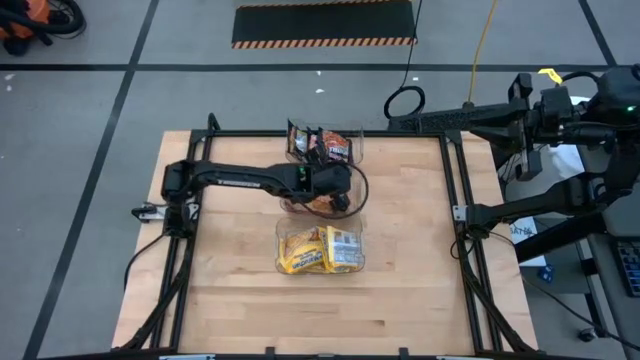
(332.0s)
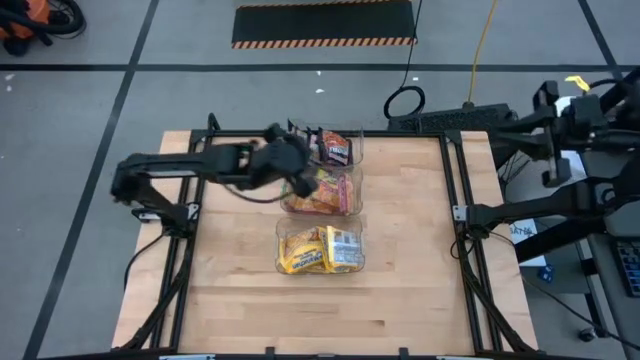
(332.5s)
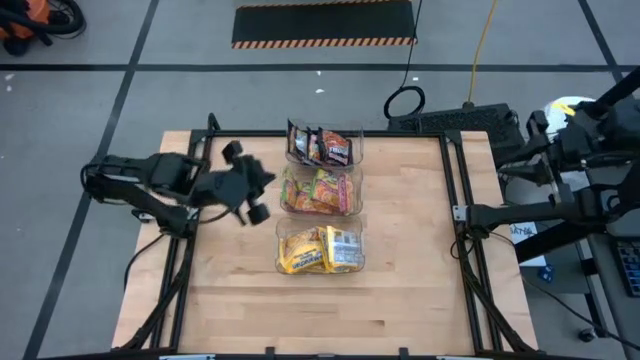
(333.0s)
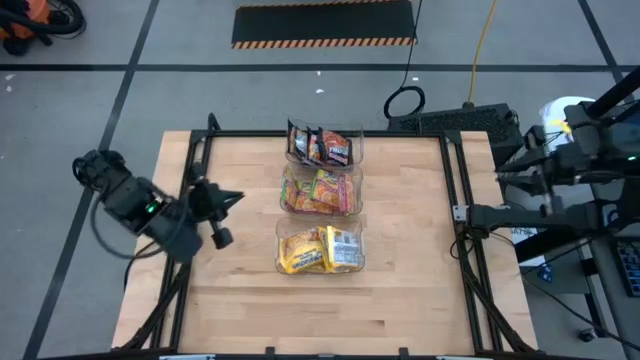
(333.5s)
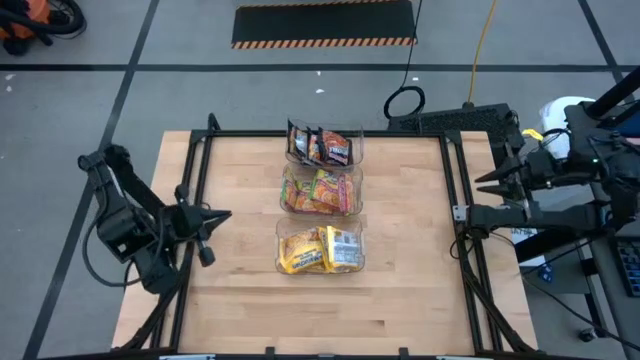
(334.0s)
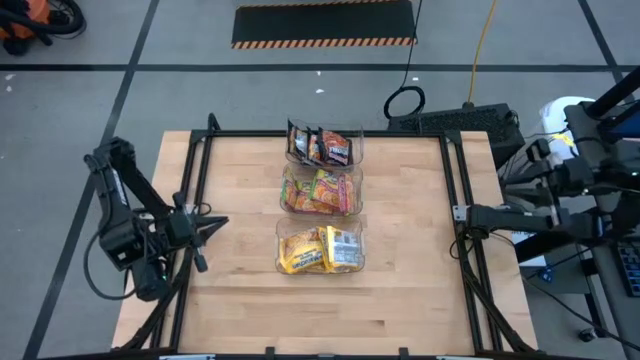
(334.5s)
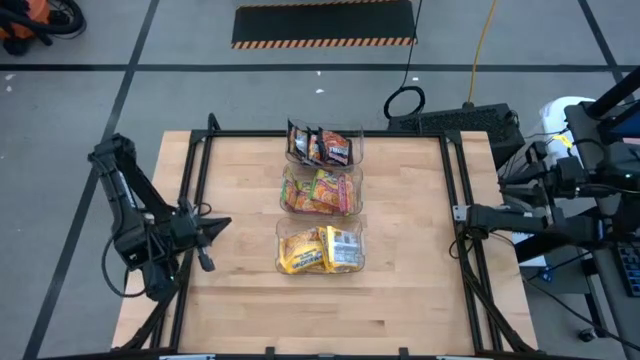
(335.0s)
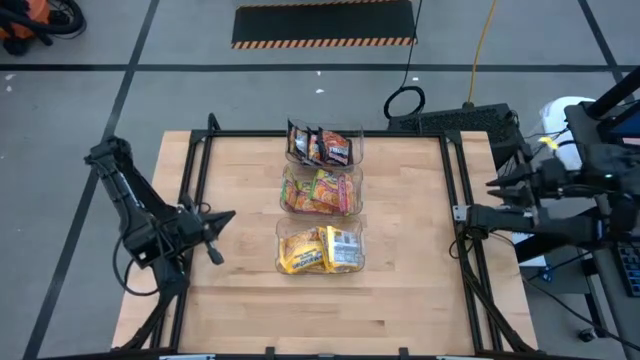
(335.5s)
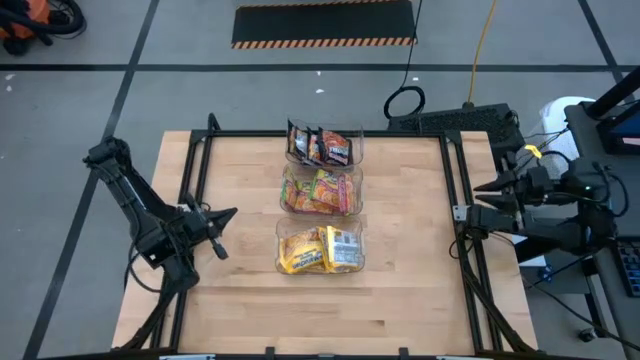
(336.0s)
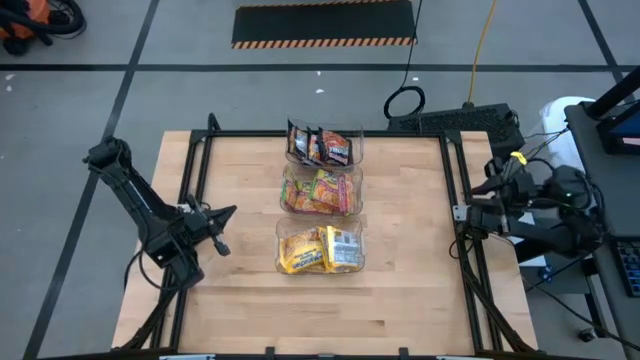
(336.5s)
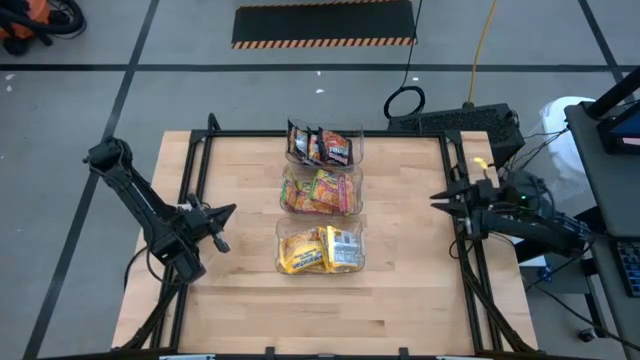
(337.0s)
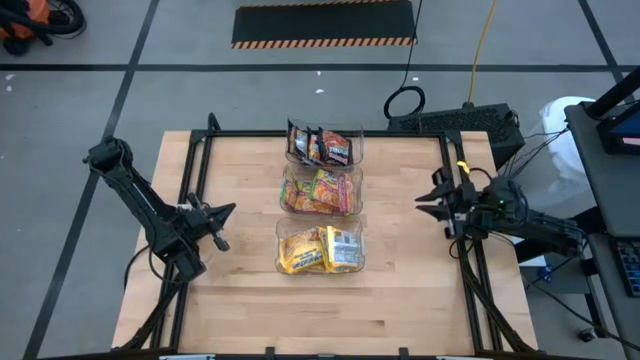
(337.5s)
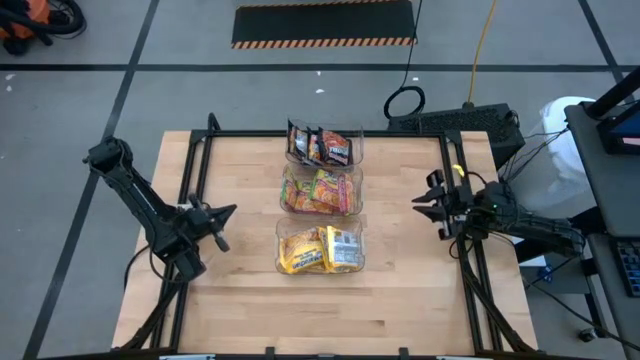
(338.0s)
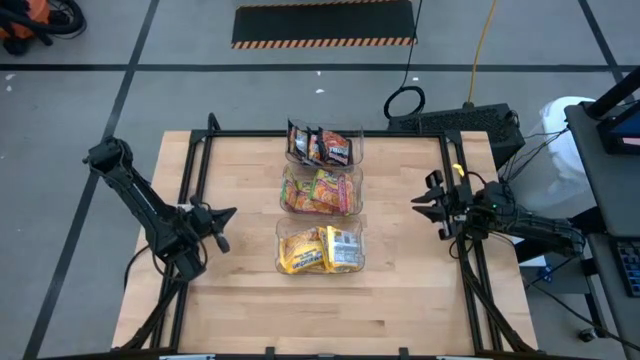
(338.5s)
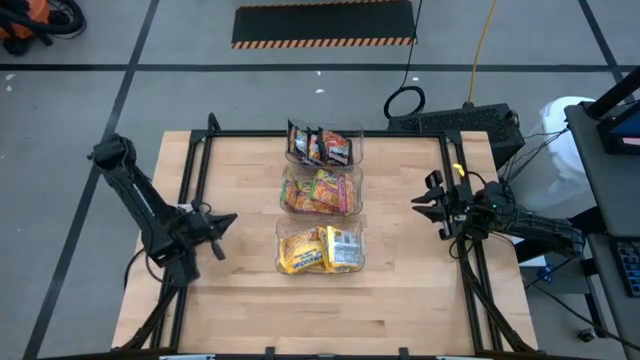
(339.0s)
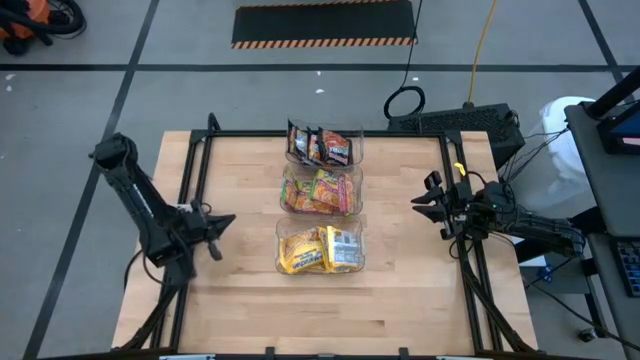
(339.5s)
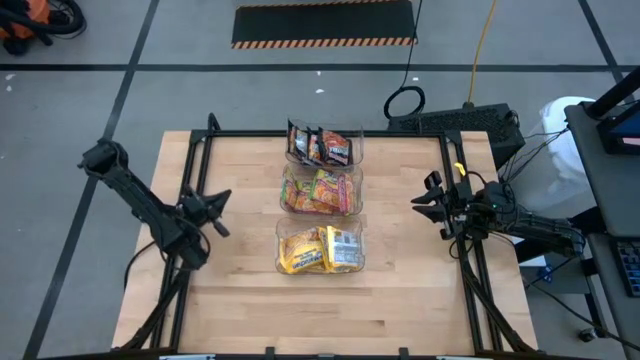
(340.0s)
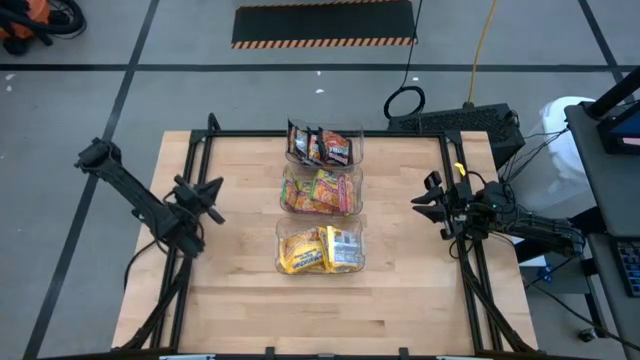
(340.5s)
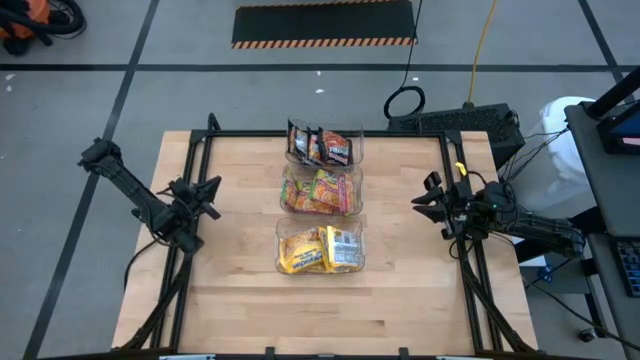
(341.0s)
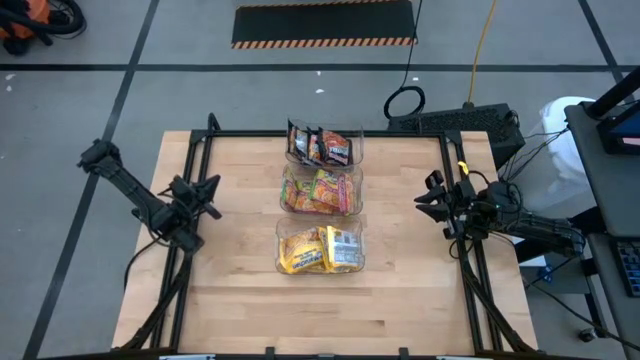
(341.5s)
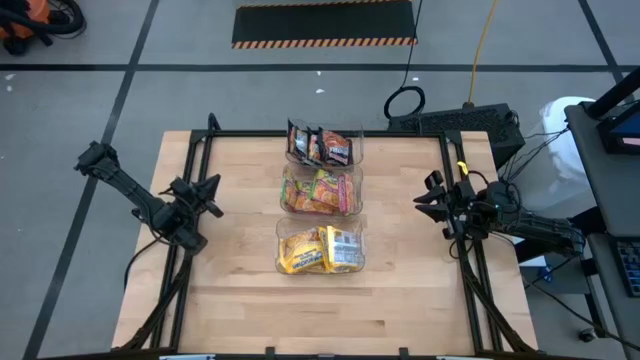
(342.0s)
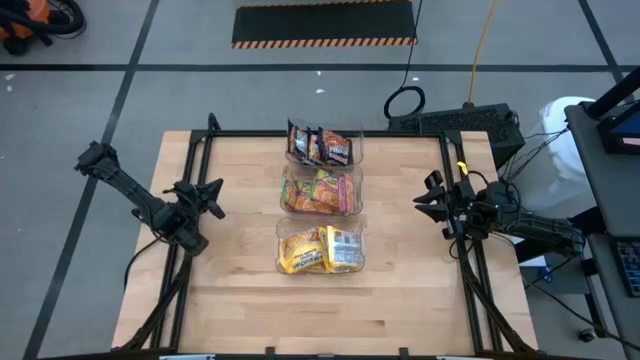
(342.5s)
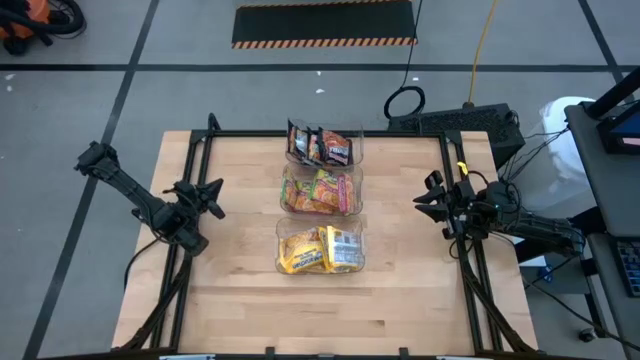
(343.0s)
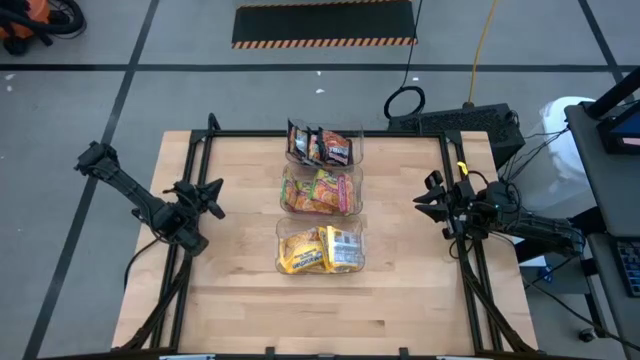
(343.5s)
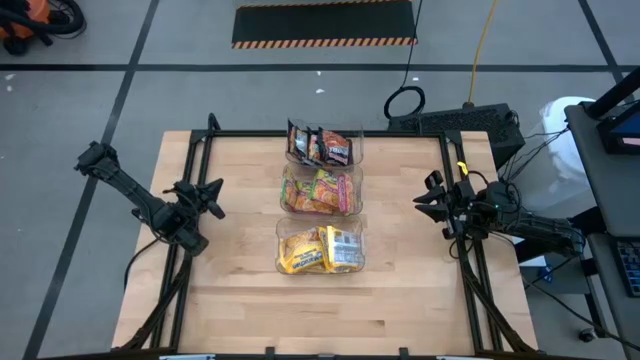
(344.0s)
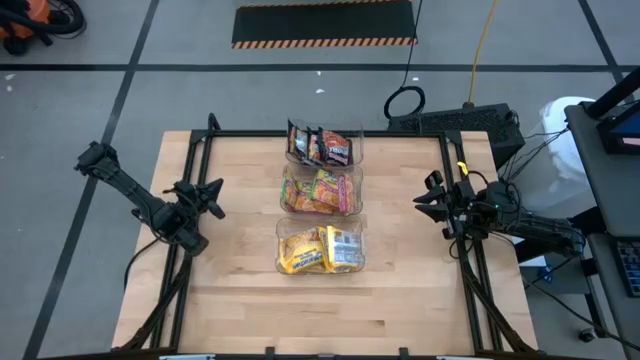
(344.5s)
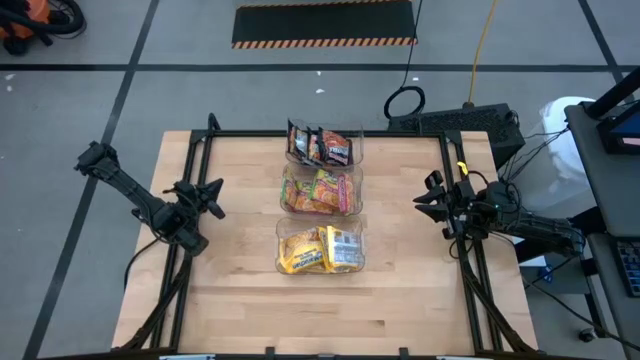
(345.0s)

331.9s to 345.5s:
Task: Sort Maruchan noodles
Return to Home Position

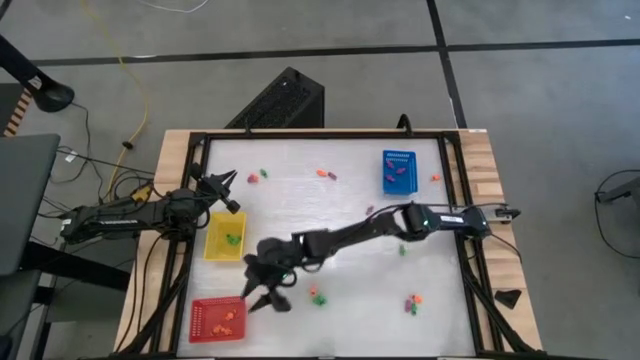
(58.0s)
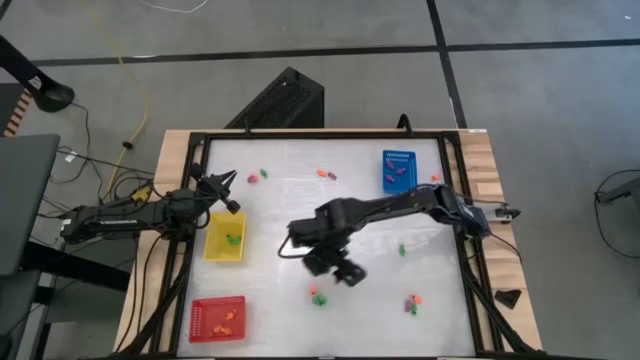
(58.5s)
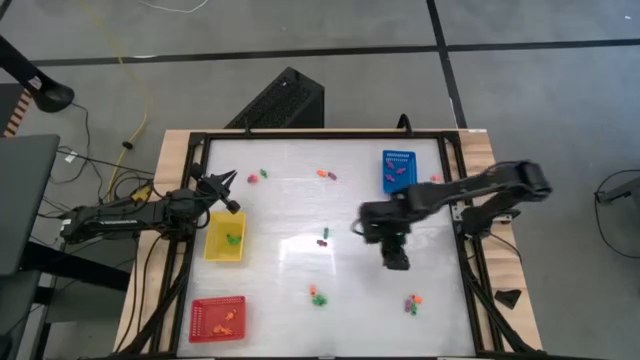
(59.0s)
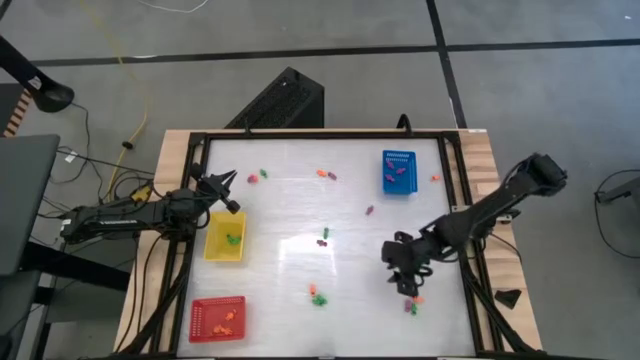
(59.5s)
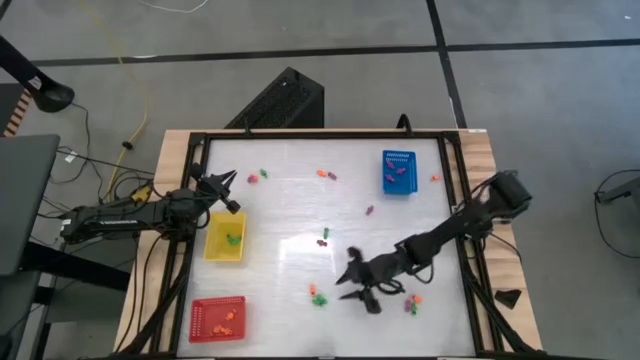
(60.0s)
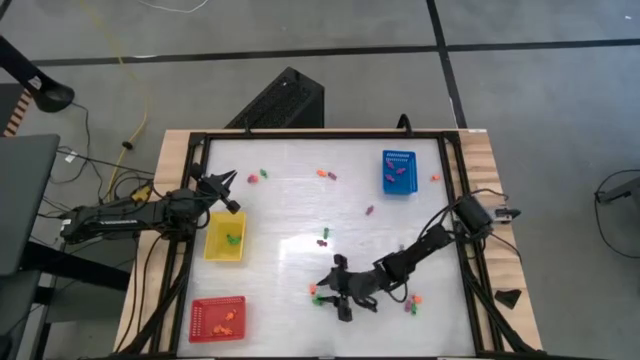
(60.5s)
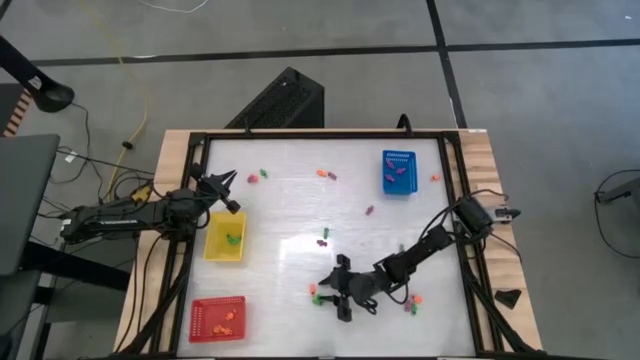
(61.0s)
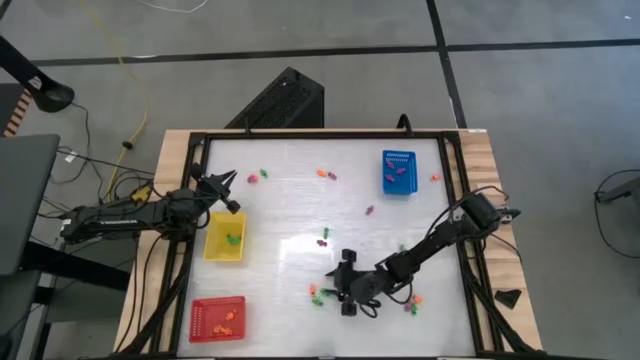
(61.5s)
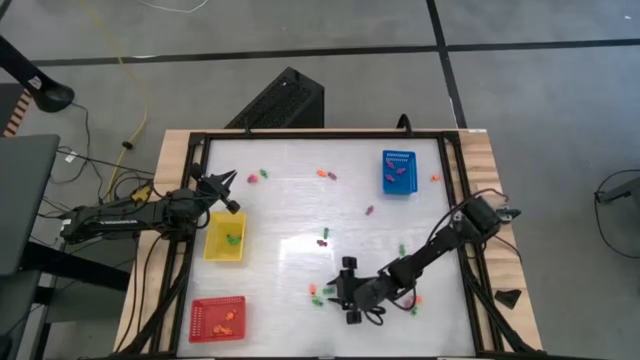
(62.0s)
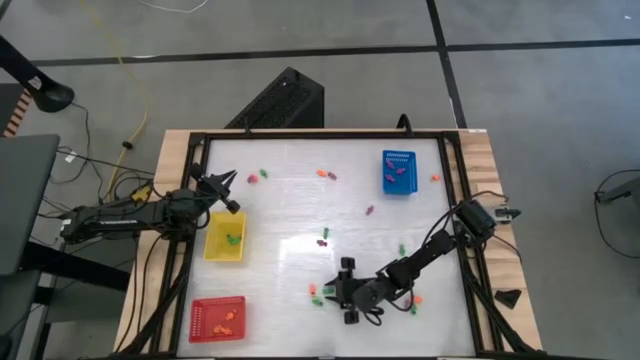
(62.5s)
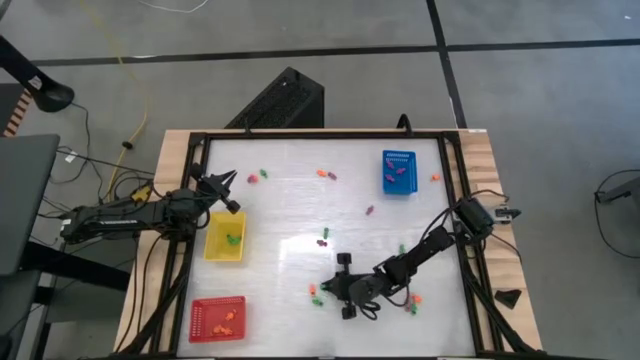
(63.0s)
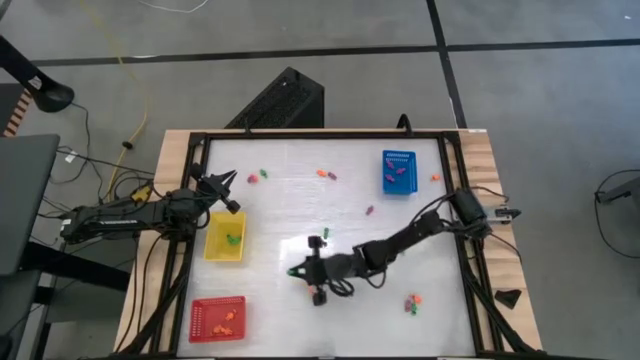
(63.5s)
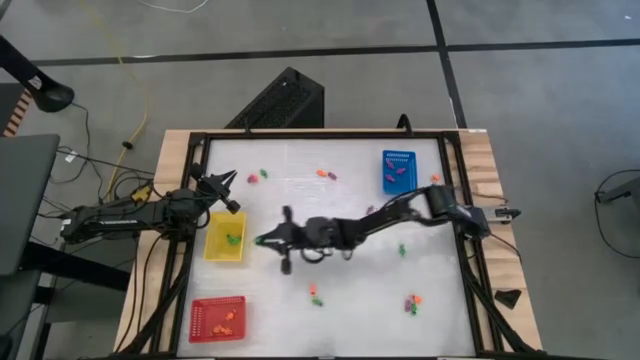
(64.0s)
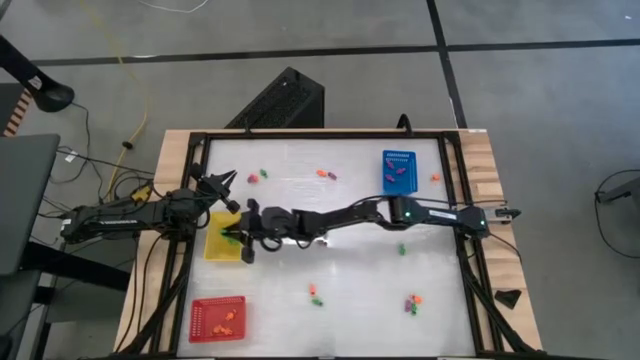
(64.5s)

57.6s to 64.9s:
Task: Sort Halloween decoration
Put the green skeleton toy into the yellow bin

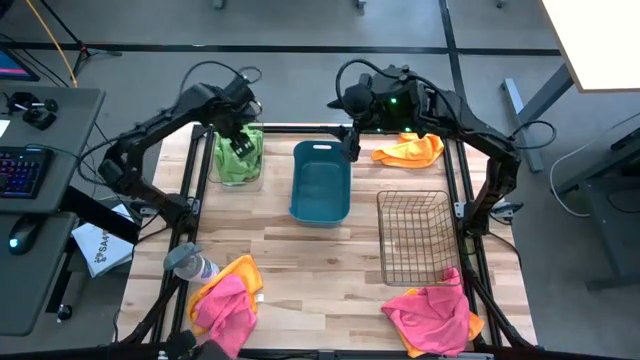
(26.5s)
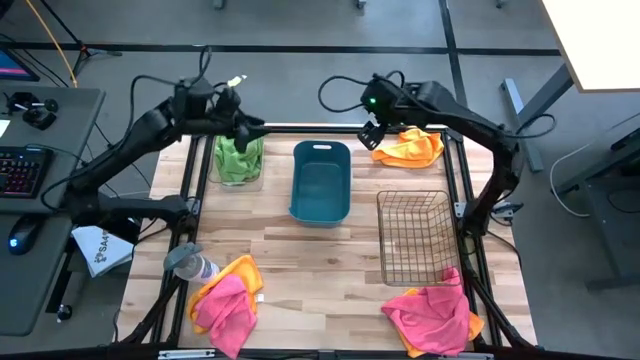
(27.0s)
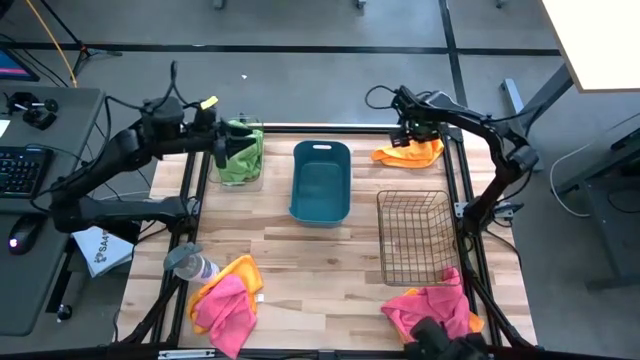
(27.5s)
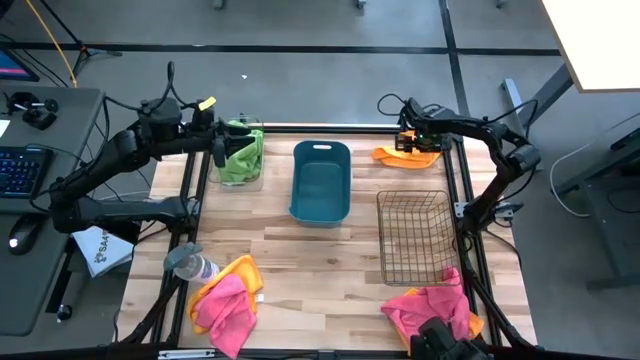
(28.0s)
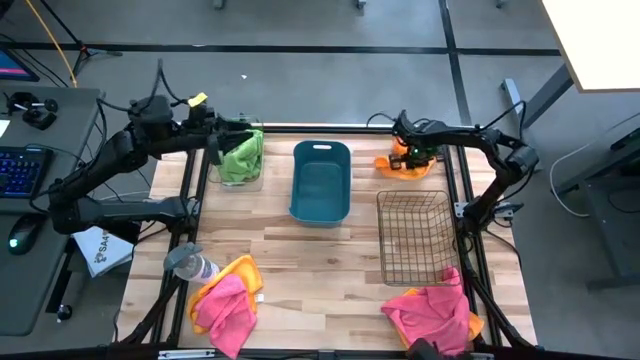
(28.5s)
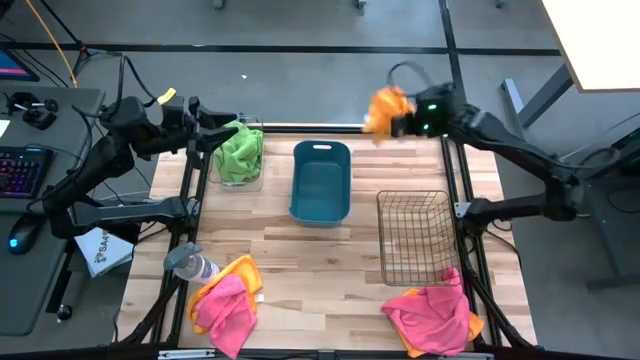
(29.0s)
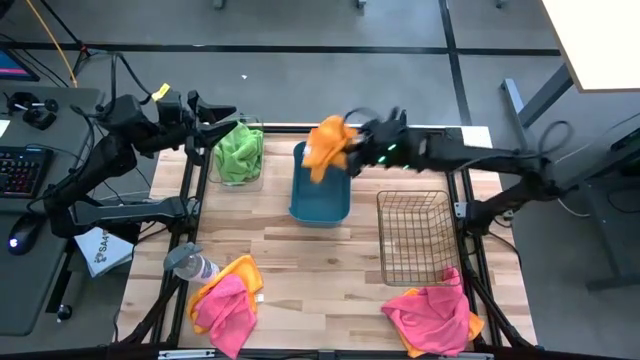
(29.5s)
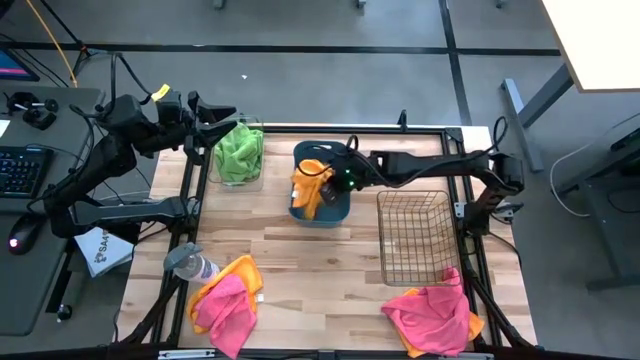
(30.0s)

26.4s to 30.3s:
Task: Sort microfiber towel by color & place in baskets
Put the top orange towel into the blue bin
